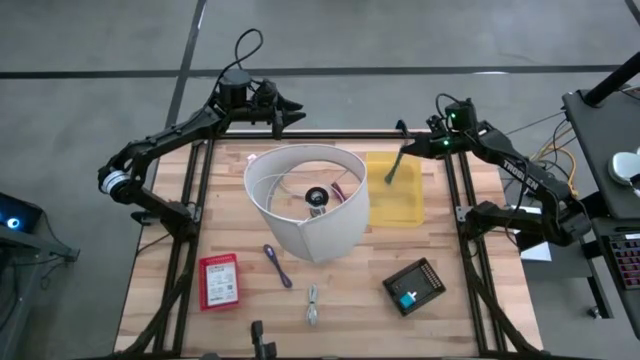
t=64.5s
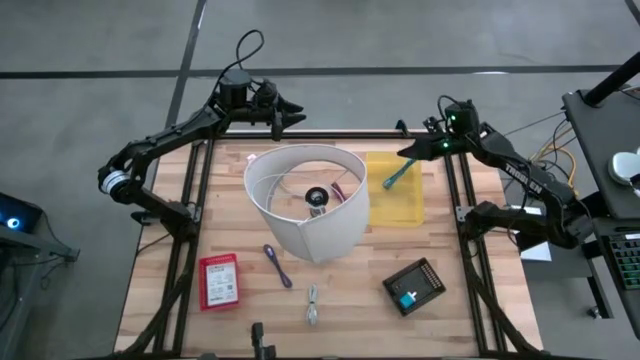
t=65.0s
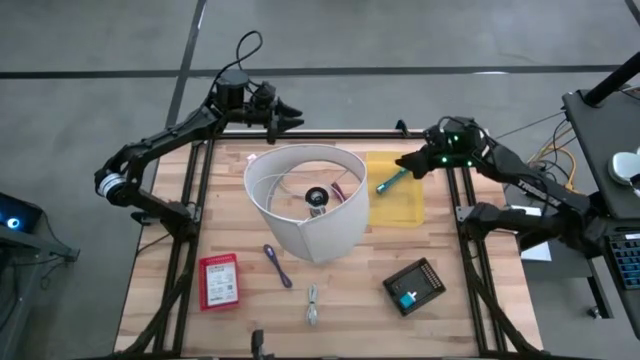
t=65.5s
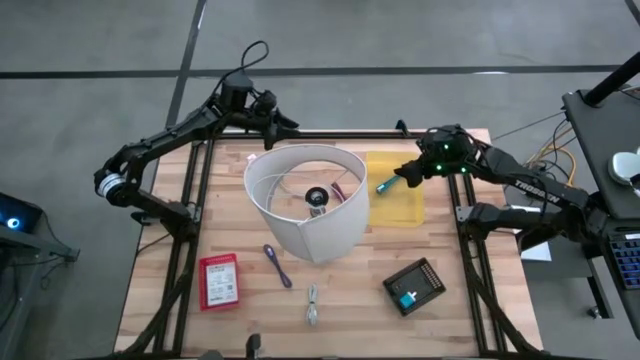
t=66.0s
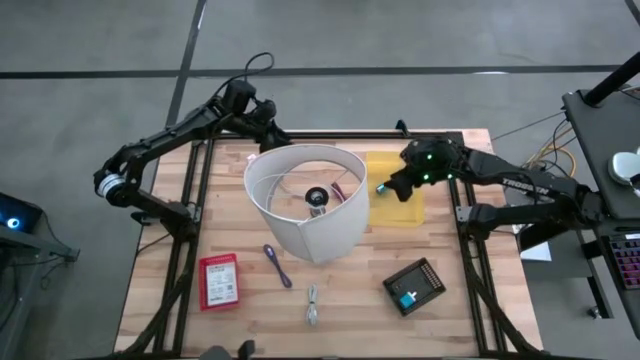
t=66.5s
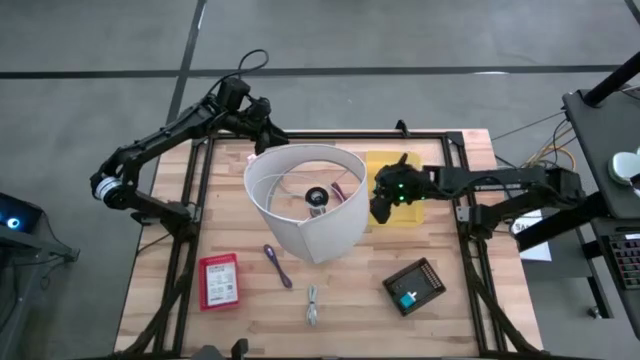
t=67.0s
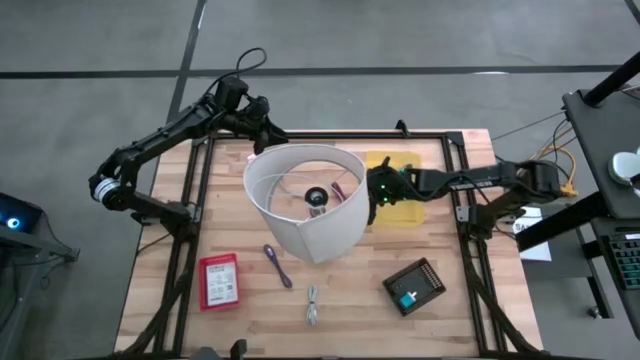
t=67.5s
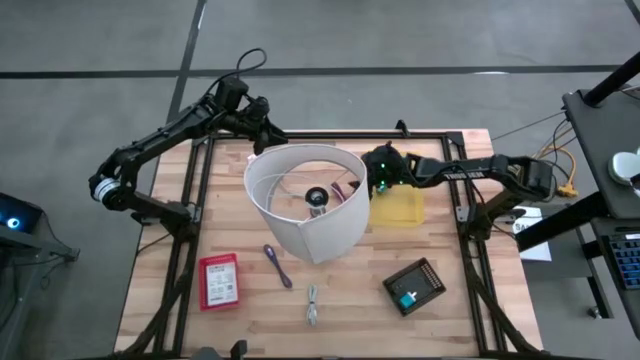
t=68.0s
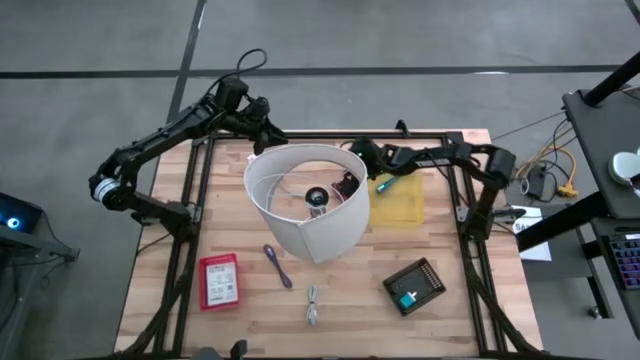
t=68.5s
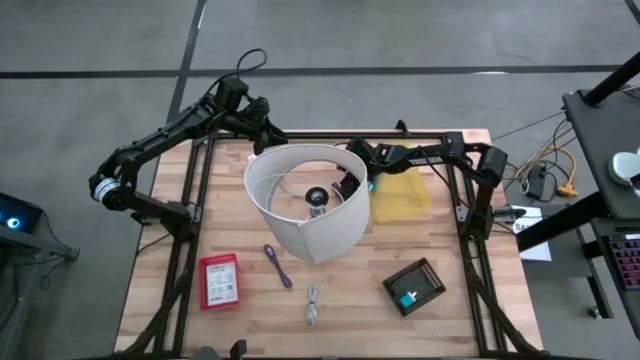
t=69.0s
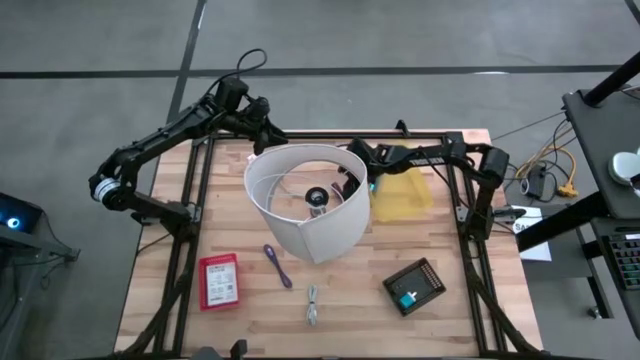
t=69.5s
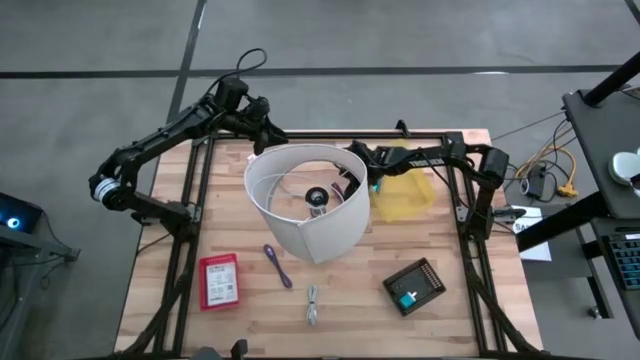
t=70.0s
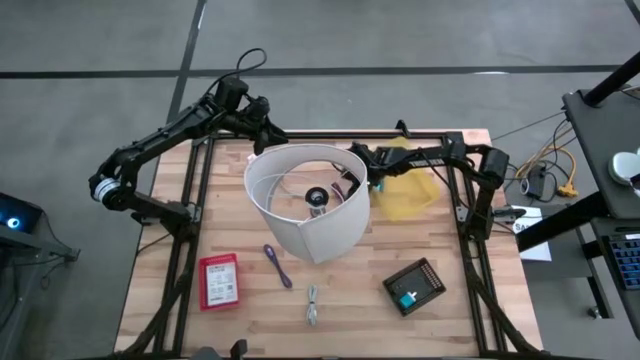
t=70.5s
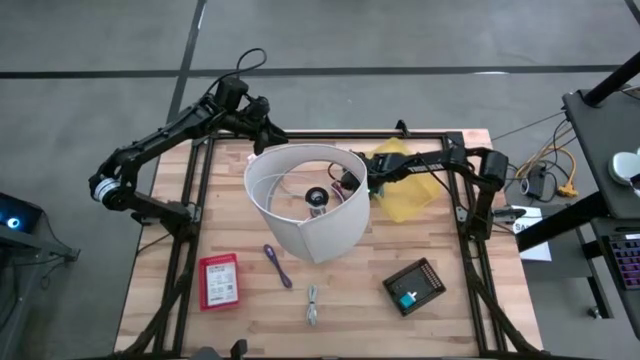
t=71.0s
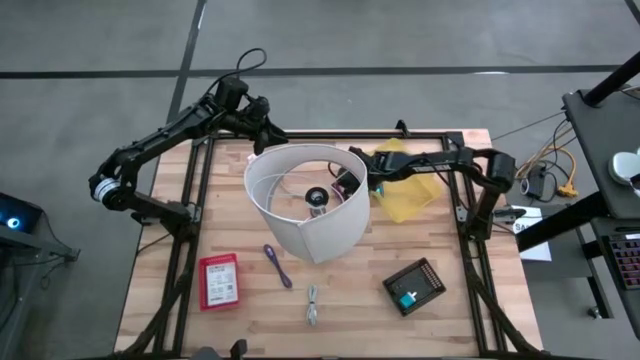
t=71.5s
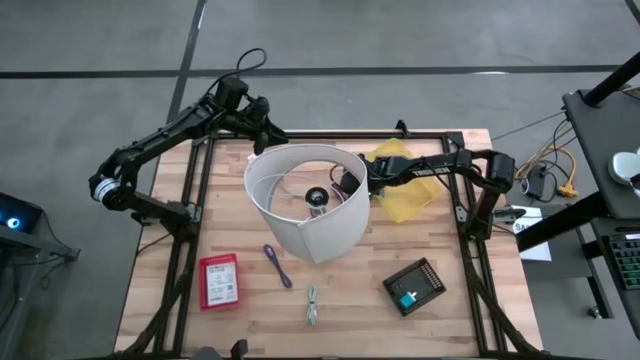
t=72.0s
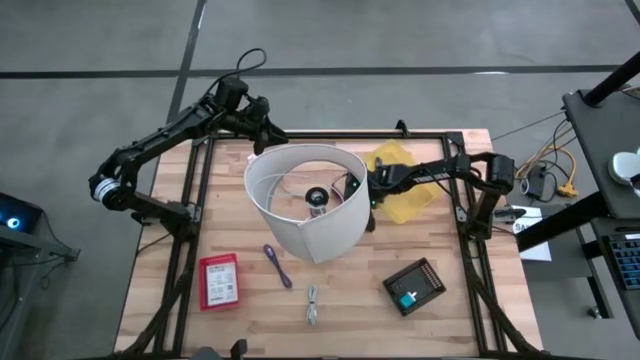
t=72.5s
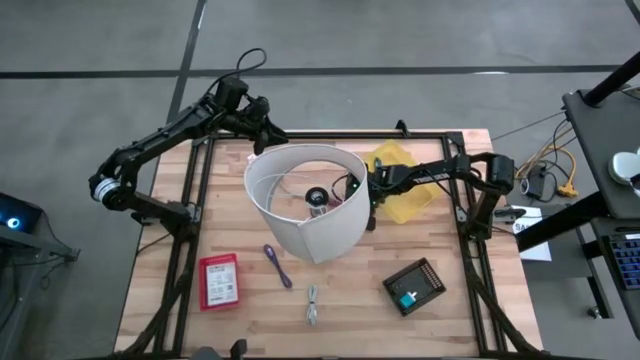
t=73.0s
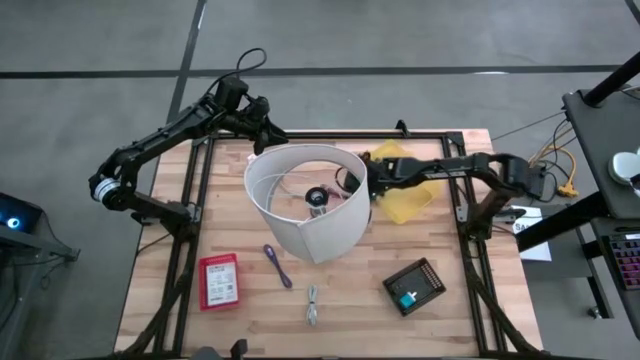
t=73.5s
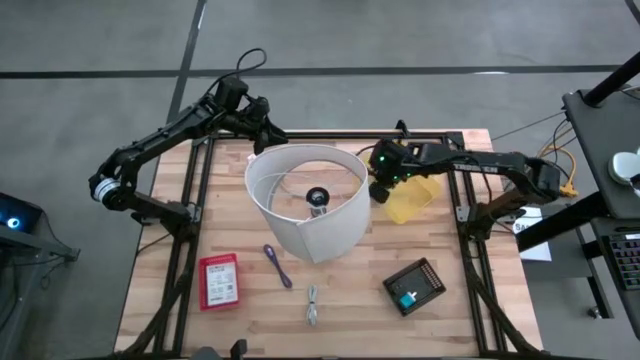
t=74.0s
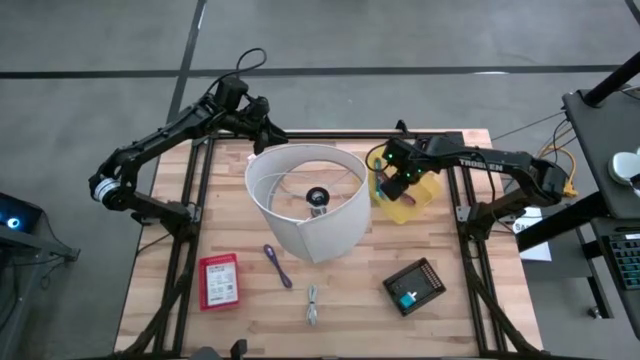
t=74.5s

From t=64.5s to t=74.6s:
Task: Pick and place items into bin
Put the red USB cable into the yellow bin

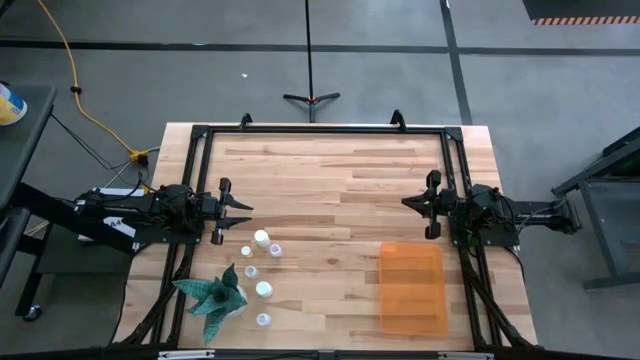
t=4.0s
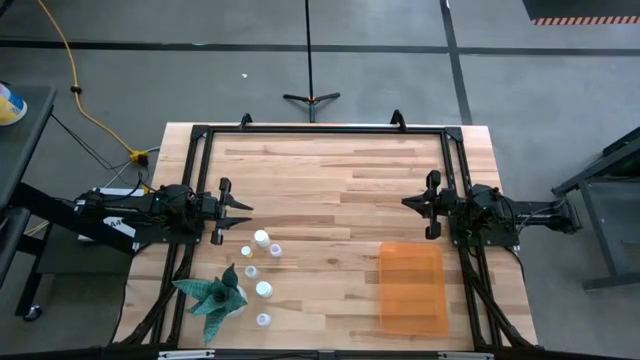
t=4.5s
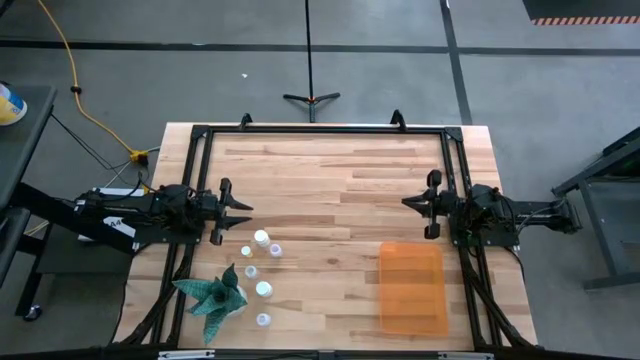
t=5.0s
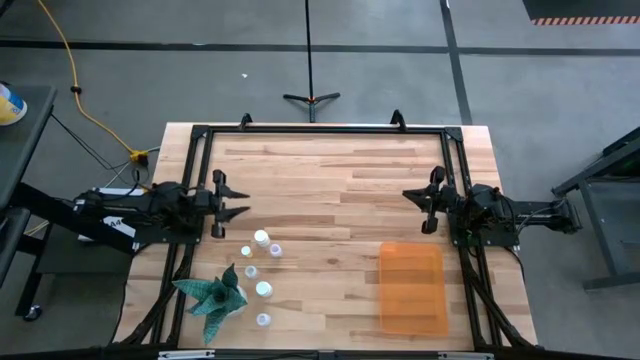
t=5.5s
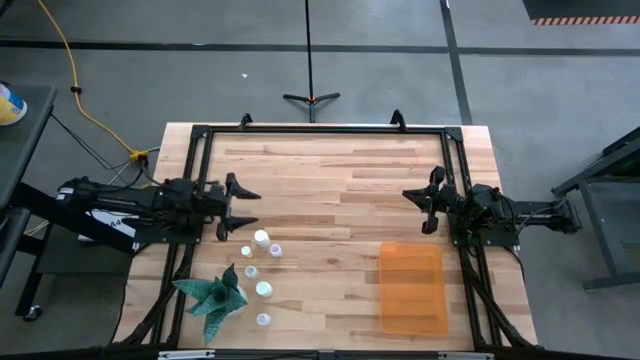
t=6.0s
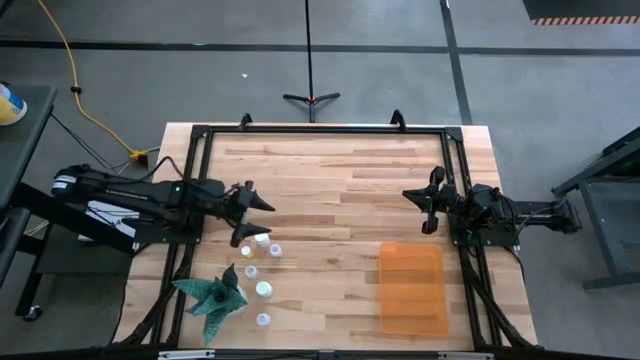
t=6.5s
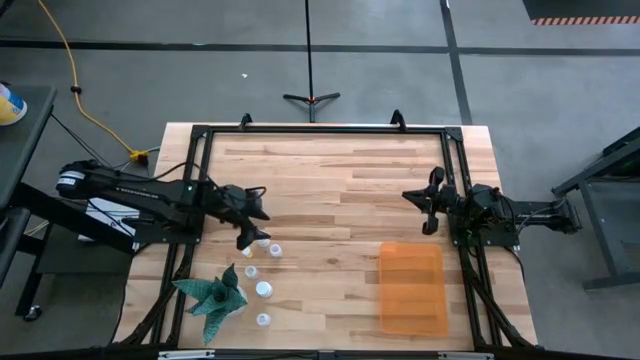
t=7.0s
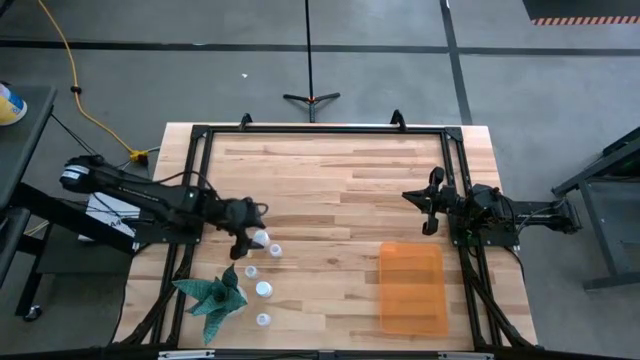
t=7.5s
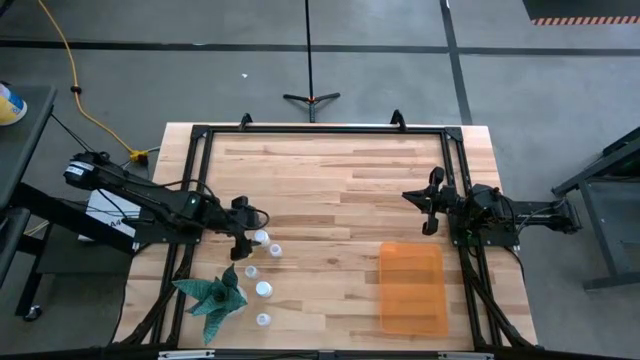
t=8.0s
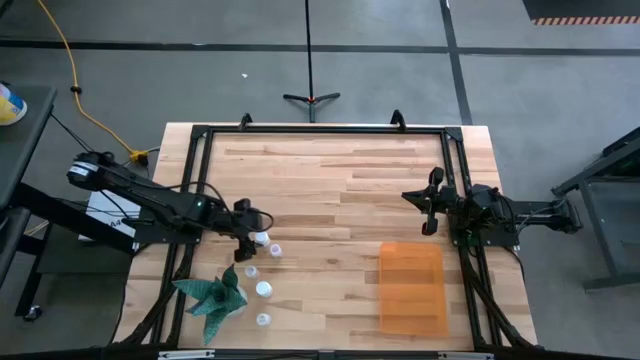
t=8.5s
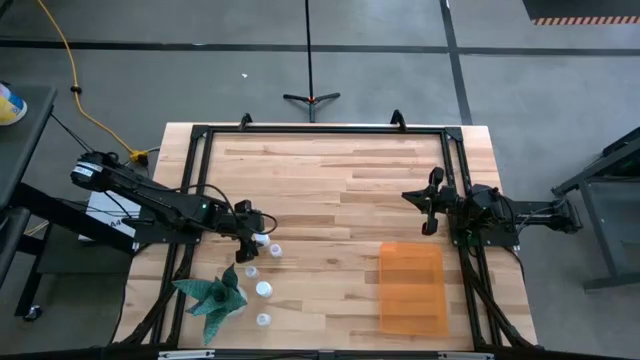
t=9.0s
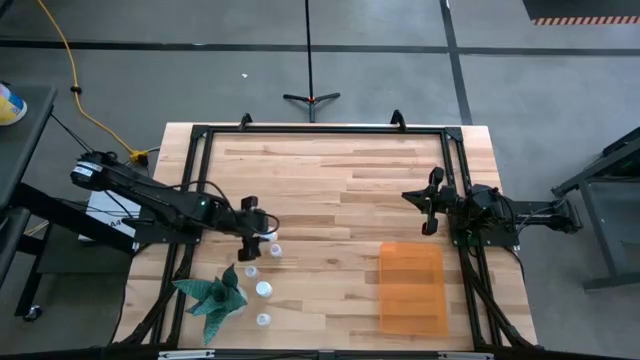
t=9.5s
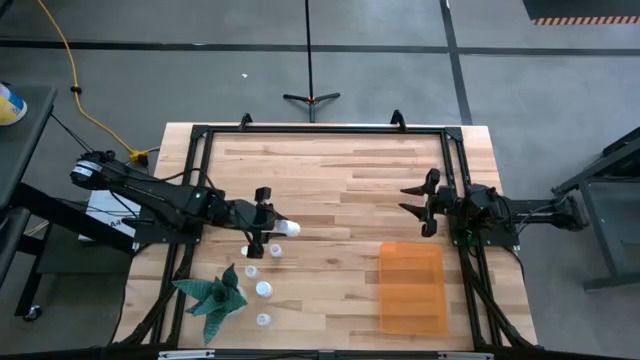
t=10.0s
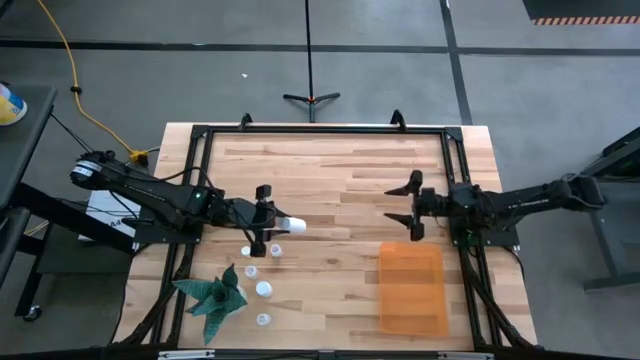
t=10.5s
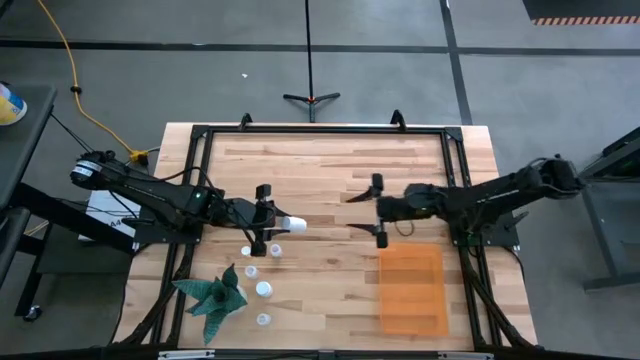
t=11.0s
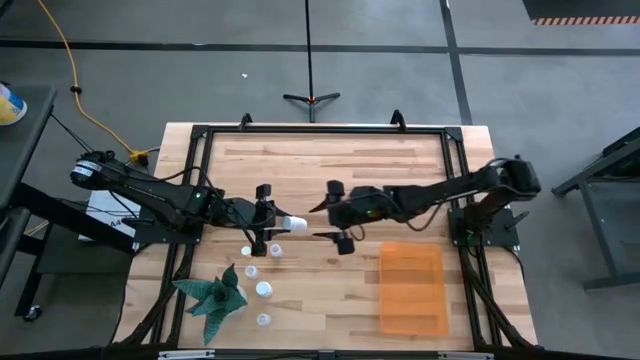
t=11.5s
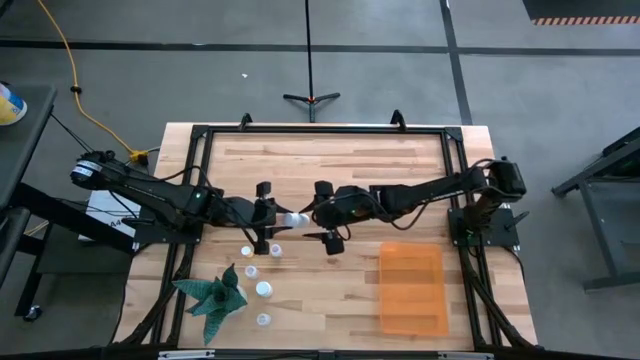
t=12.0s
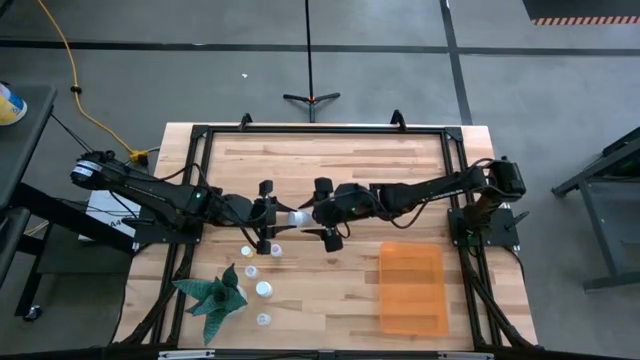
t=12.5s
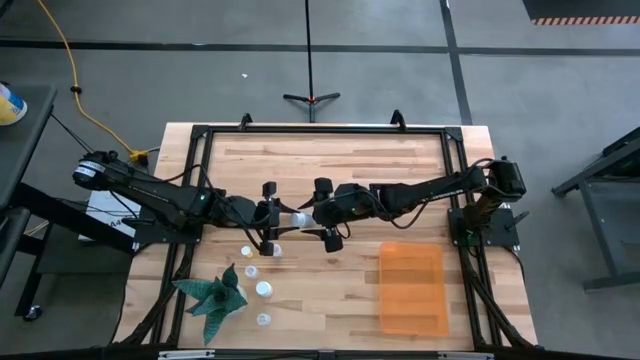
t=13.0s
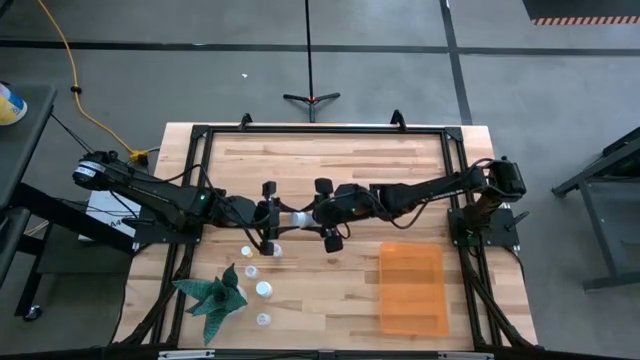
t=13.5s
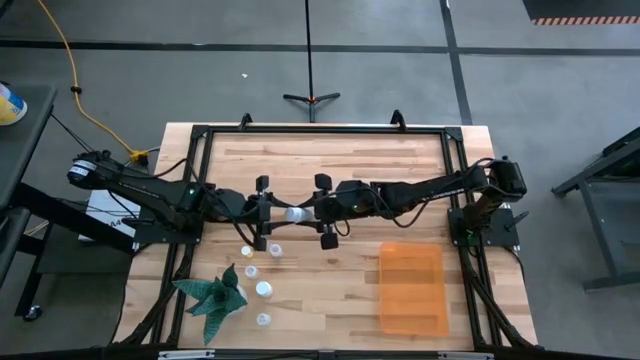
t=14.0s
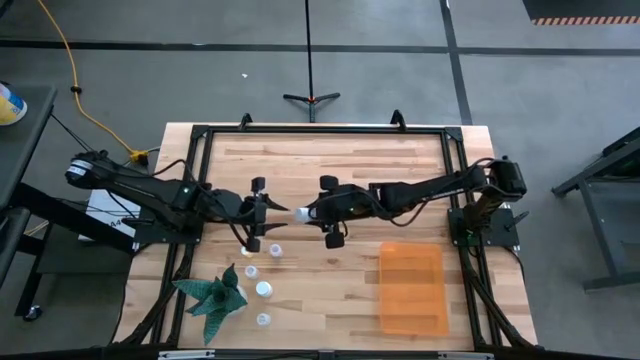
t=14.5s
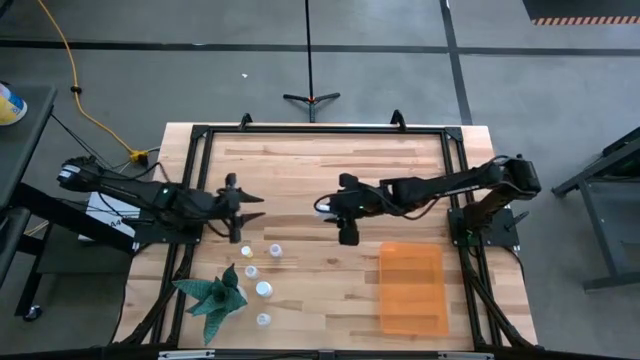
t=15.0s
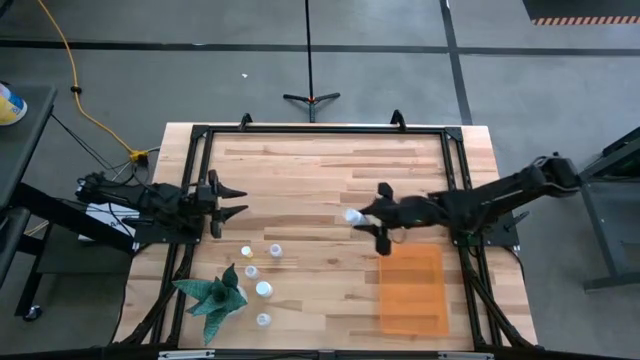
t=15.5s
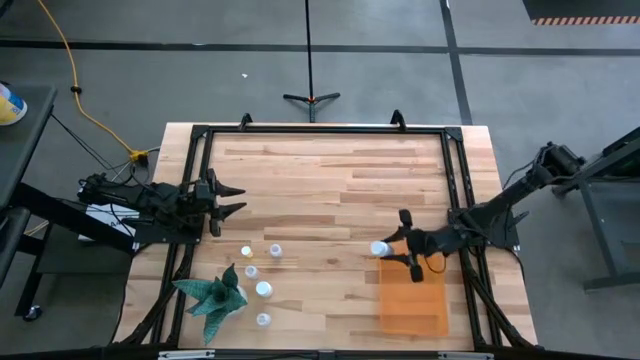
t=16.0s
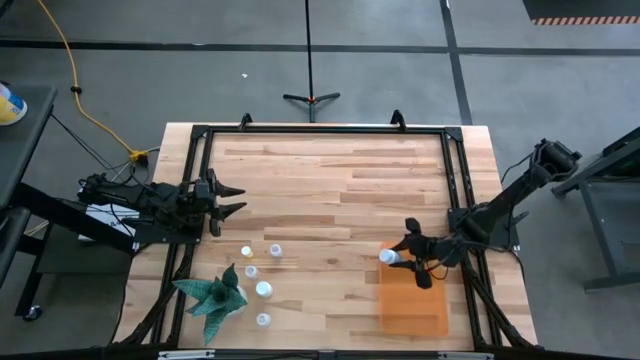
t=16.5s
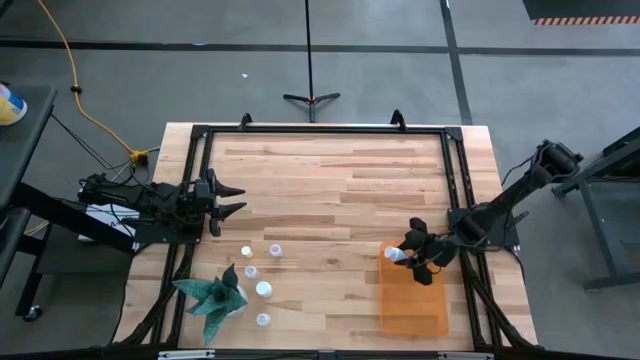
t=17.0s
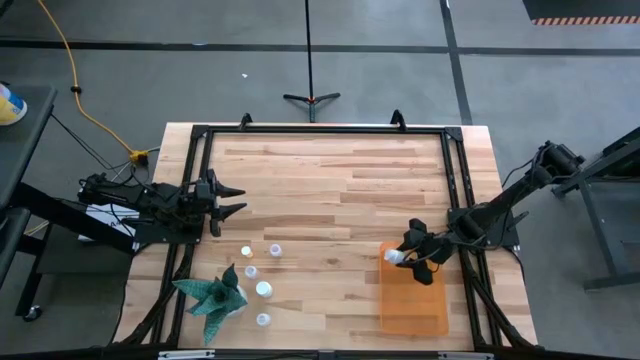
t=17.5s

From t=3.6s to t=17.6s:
Task: Pick and place pill bottles into a basket
Put the top white medicine bottle into the orange bin
